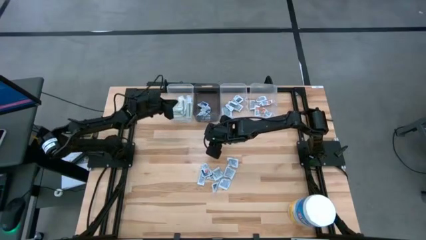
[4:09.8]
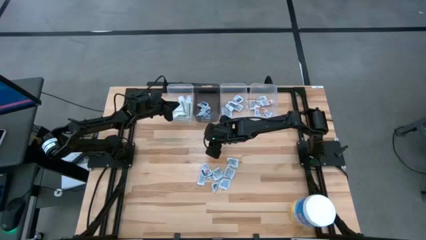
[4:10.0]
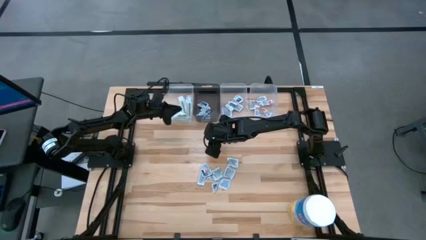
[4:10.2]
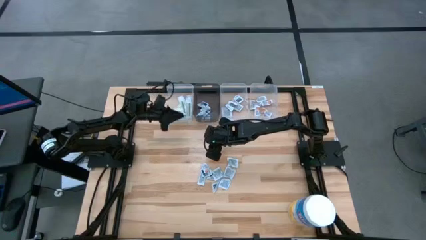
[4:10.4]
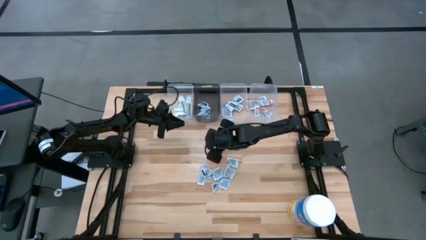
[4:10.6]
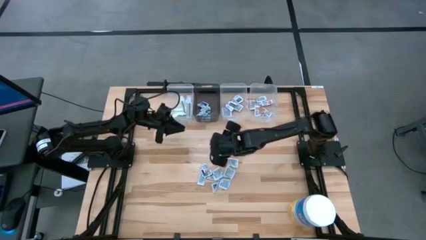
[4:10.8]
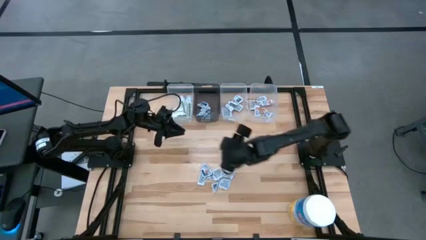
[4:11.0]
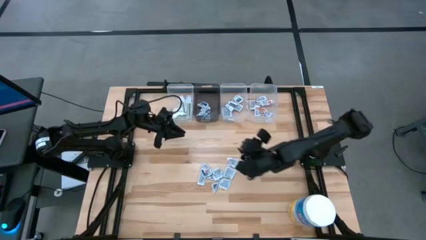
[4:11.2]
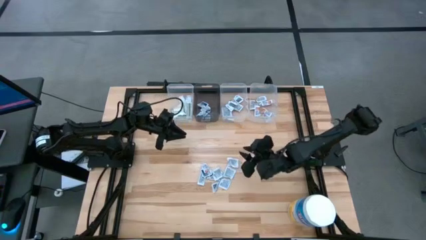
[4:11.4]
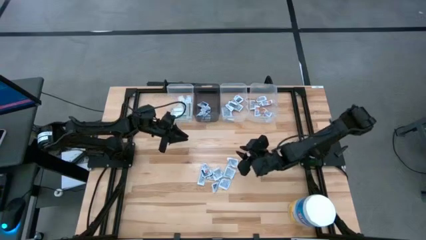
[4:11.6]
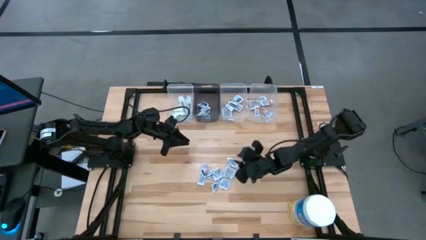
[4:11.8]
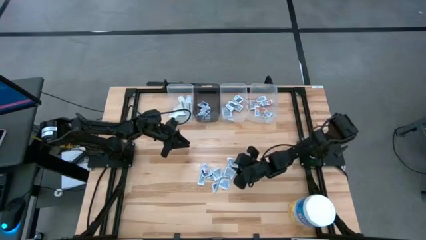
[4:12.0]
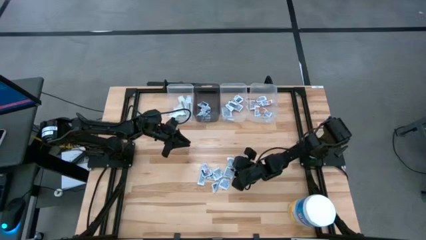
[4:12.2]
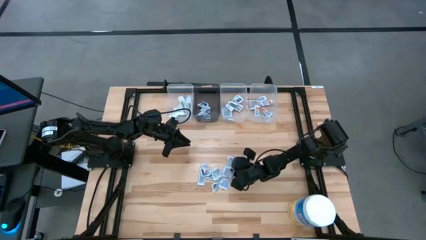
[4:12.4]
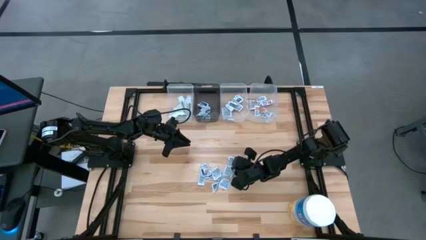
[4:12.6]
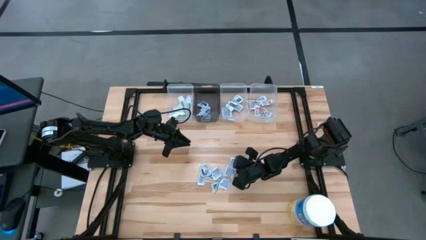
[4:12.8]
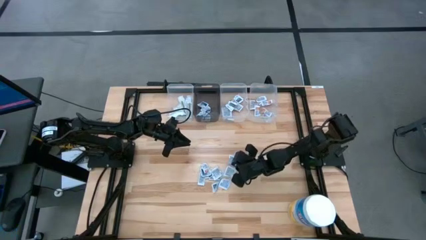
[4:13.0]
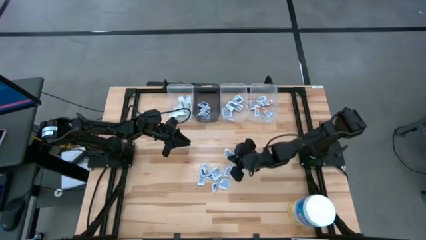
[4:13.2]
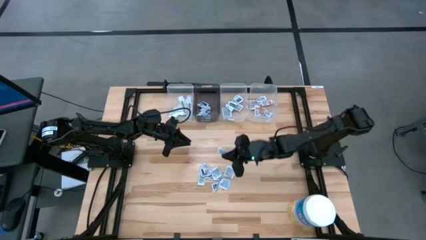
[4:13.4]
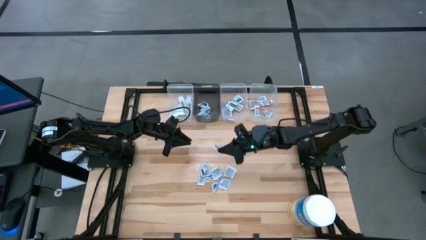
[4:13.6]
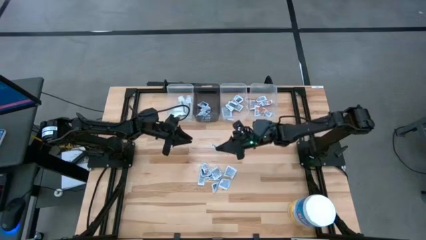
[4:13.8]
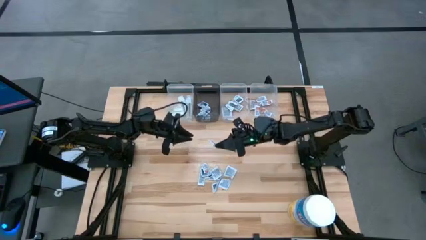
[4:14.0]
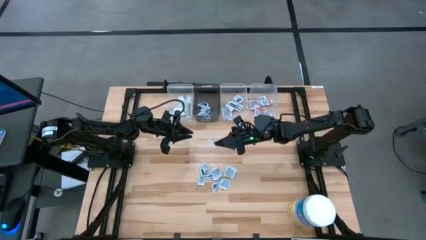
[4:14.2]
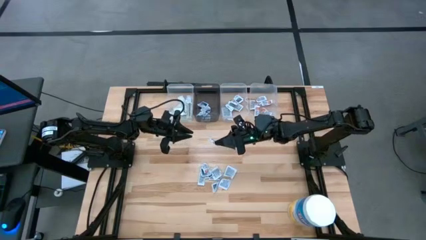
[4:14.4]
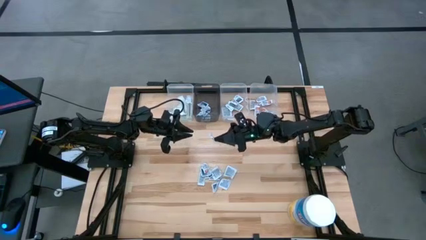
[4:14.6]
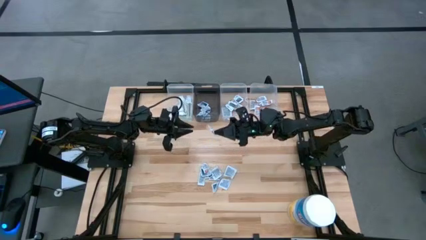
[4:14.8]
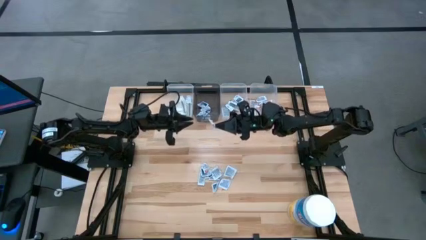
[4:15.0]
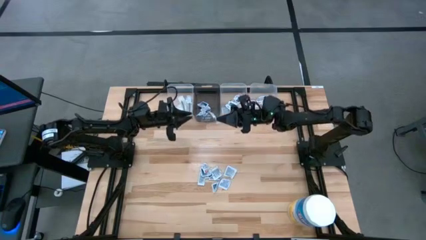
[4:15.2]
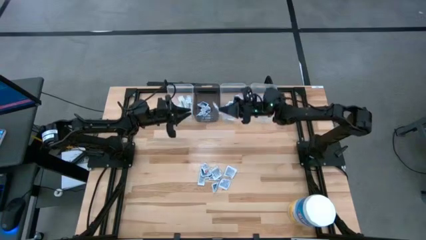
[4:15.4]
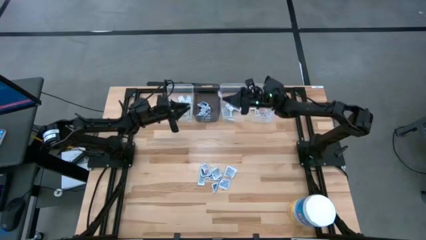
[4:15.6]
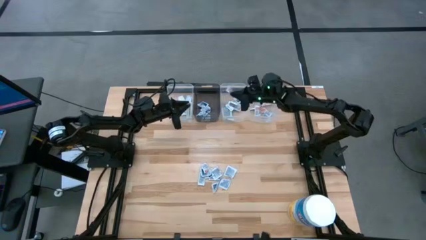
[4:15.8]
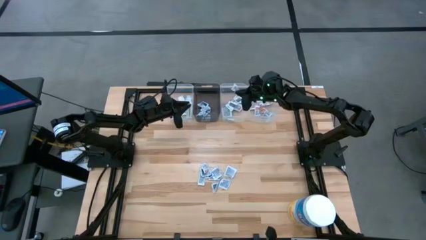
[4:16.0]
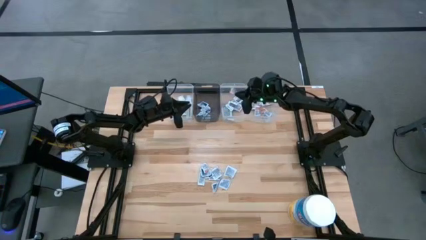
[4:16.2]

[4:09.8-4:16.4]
Task: Pick & Place First Aid Supplies
Put the towelette pack into the middle transparent bin

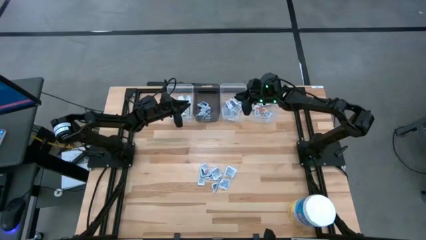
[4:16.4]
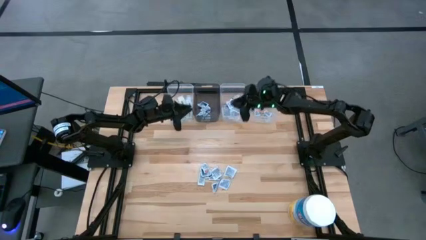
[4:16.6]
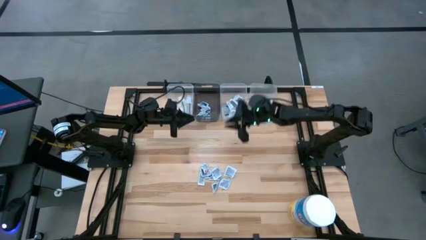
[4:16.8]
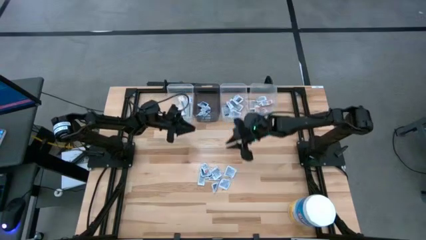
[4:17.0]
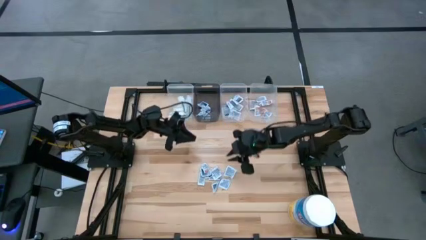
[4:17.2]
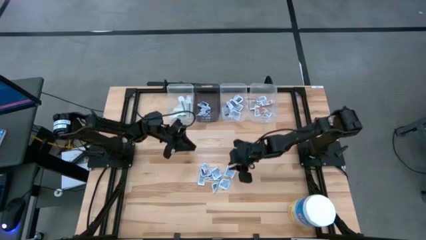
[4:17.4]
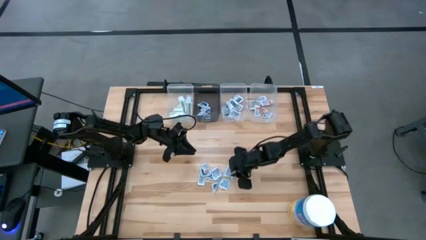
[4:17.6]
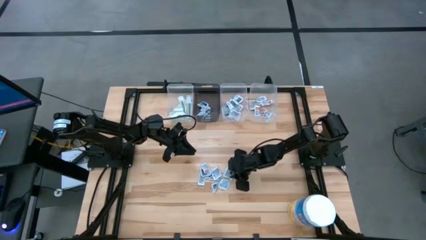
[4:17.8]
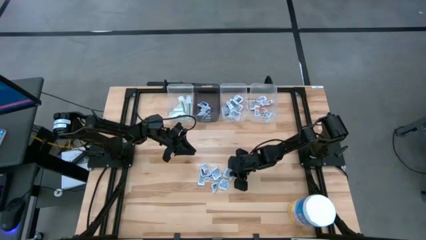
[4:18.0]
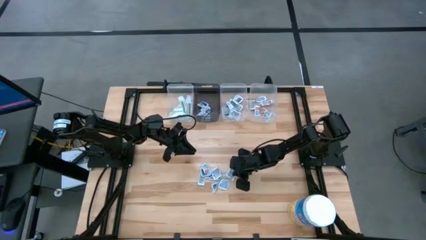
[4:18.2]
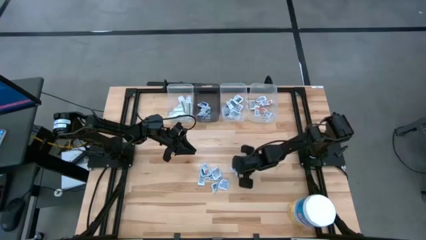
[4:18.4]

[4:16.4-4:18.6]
Put the towelette pack into the middle transparent bin

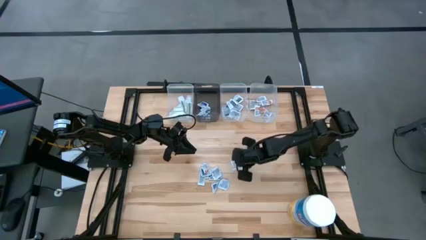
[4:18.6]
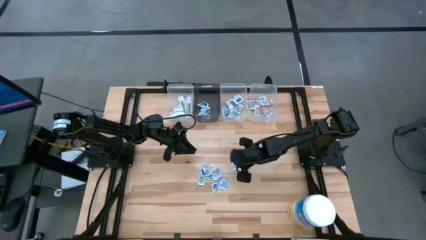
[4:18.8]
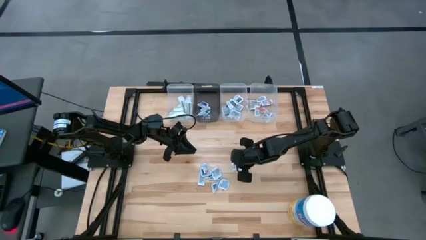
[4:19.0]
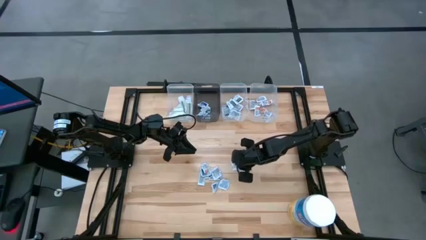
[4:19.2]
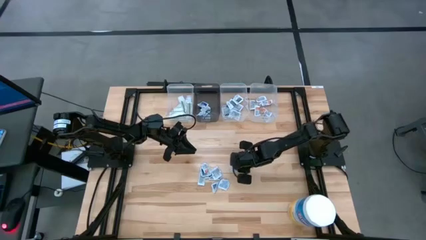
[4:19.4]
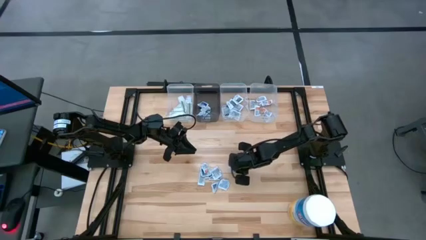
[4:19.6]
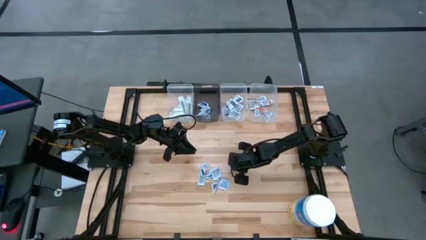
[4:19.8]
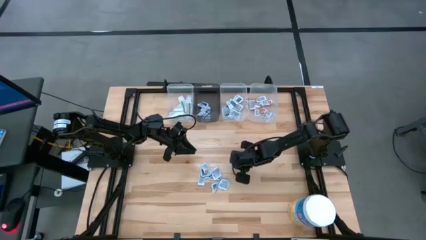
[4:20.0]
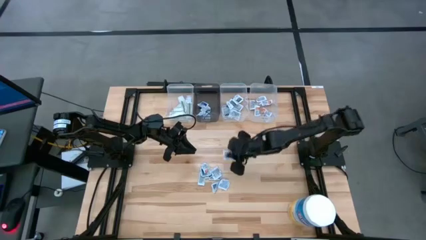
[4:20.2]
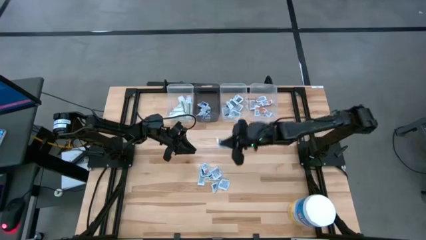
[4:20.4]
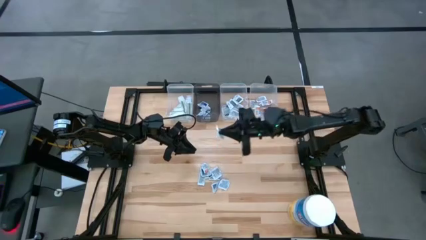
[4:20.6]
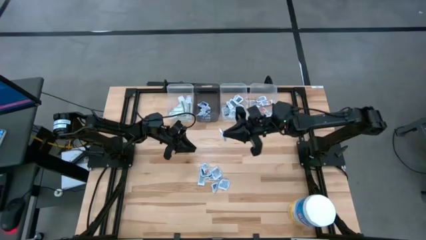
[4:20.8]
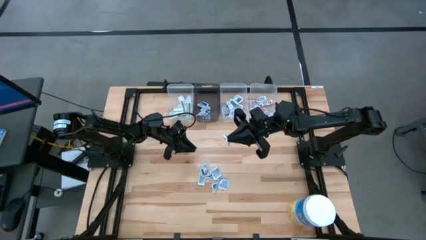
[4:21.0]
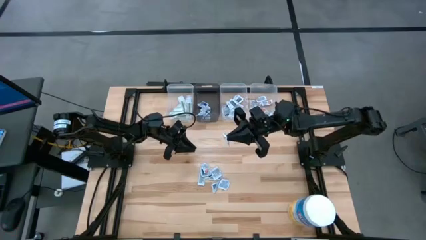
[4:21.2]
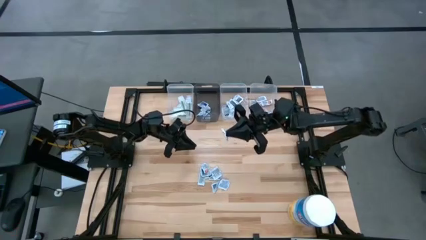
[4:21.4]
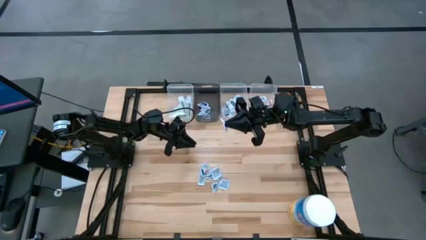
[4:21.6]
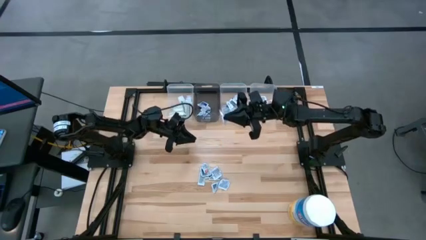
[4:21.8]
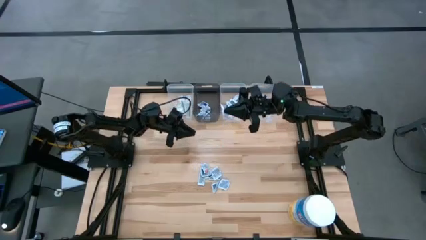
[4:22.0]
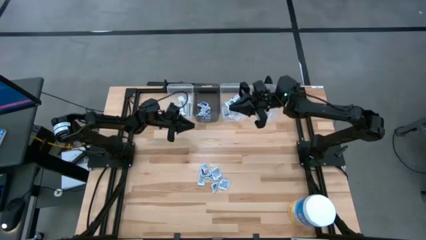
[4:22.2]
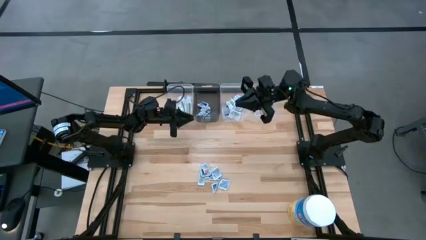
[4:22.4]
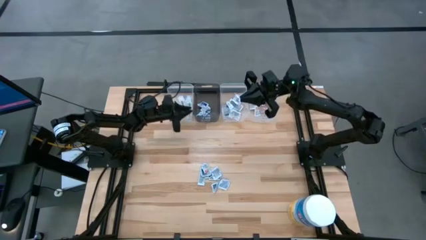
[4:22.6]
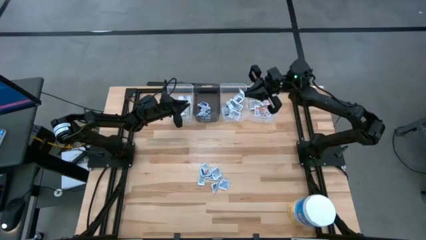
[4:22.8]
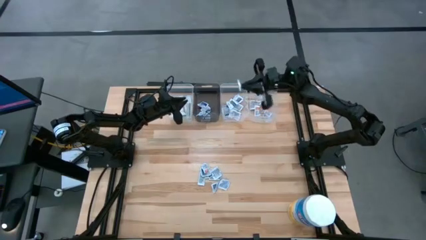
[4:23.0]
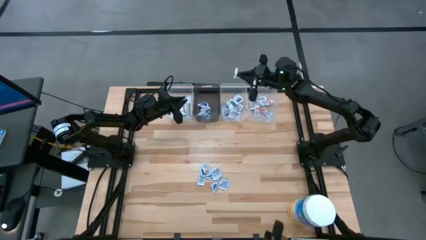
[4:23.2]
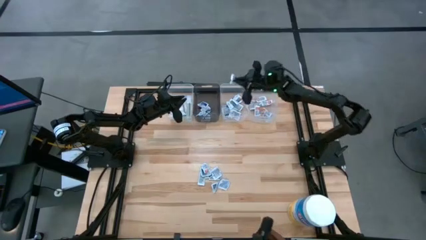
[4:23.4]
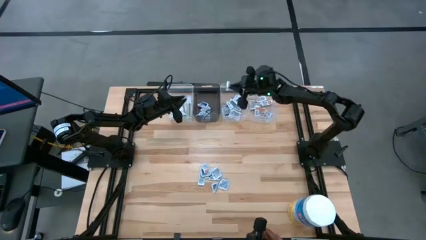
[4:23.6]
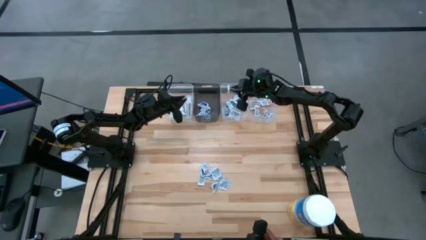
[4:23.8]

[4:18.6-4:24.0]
Put the towelette pack into the middle transparent bin

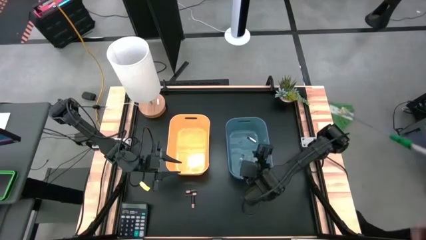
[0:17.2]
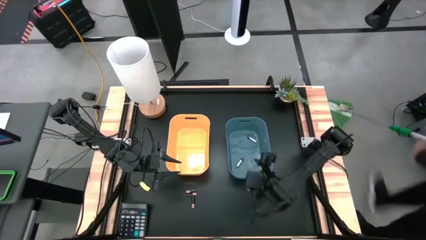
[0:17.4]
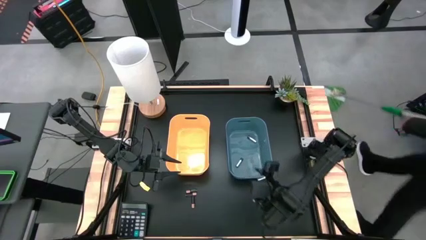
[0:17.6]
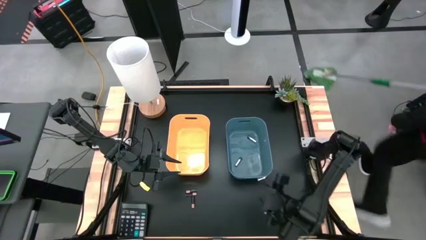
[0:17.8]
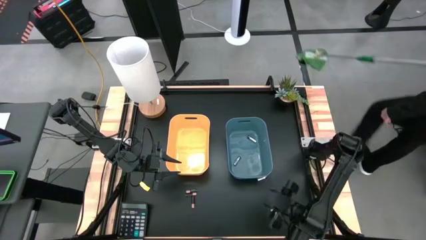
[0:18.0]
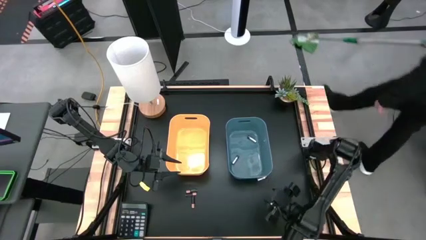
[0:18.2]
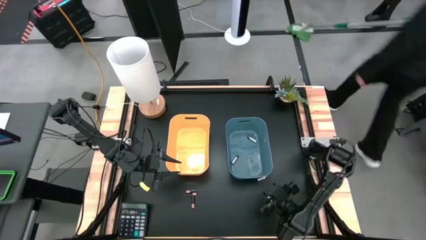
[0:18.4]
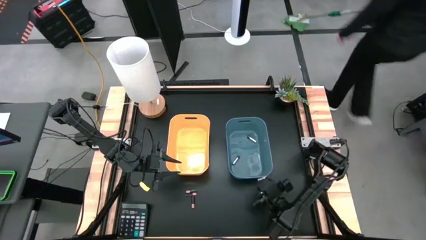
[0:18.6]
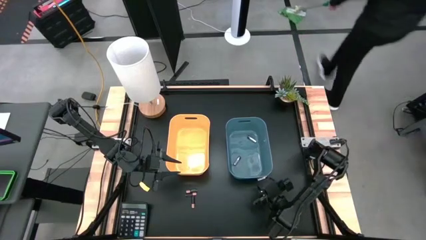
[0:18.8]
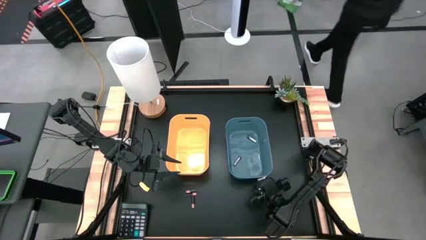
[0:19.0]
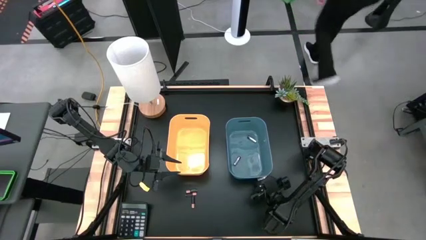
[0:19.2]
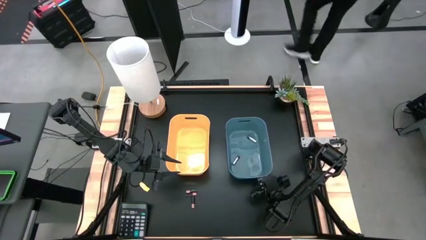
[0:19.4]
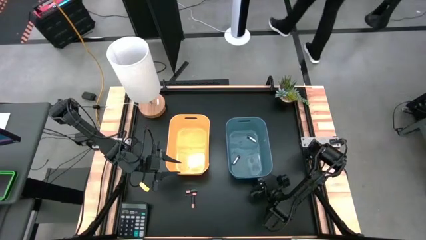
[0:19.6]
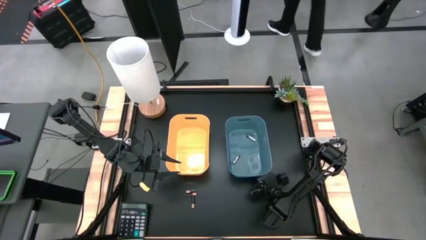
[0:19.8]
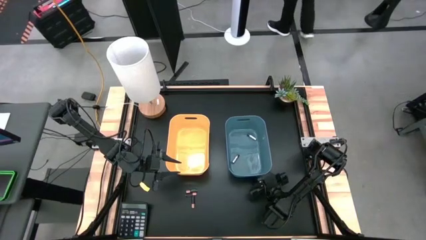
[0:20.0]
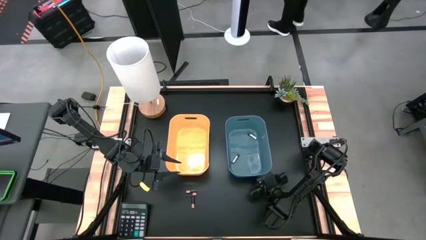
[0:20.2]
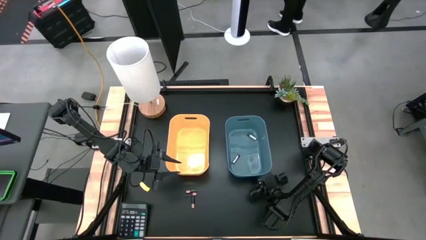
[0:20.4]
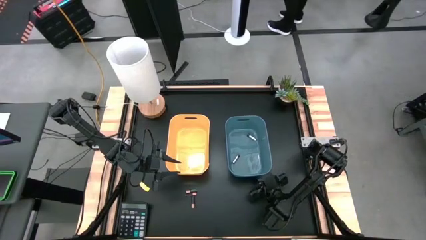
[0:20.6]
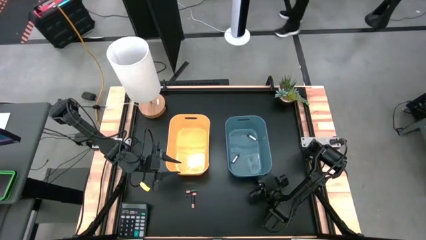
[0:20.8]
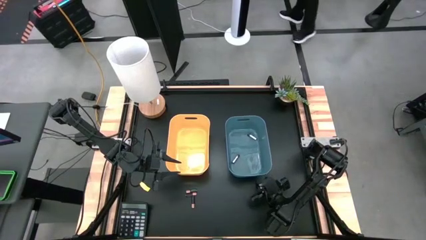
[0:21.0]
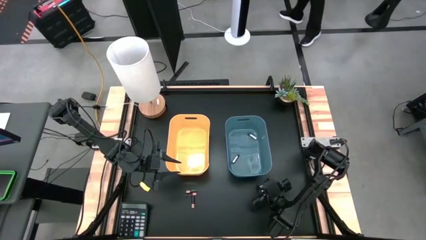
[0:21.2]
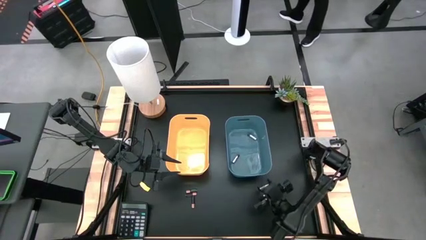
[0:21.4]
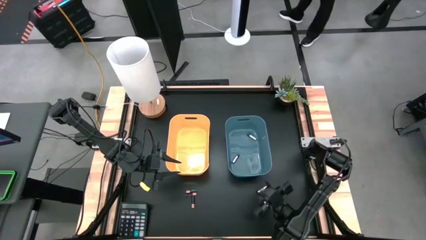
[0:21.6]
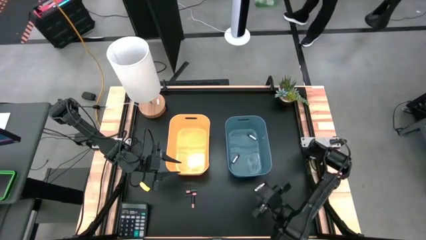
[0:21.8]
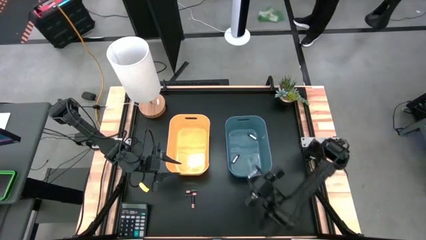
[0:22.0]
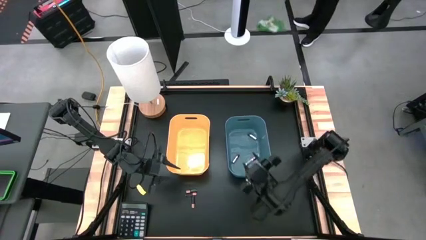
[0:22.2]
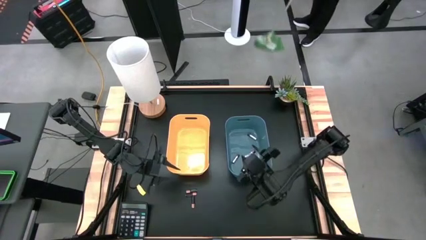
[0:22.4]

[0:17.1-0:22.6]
Task: Sort batteries
Put the silver battery into the blue bin
